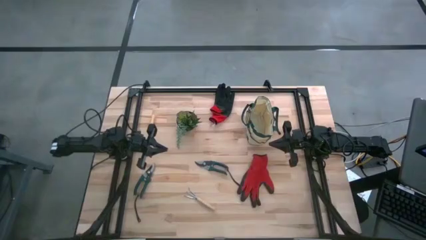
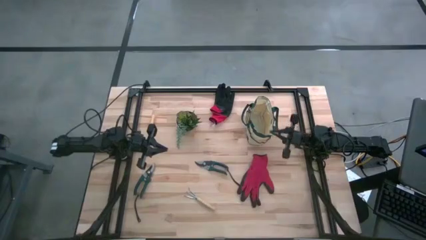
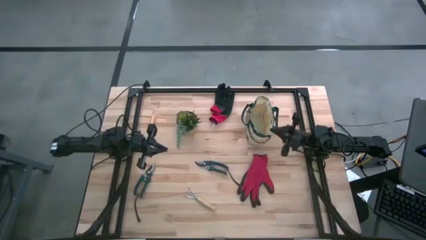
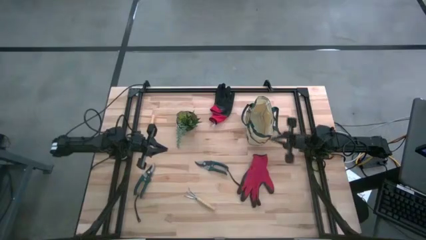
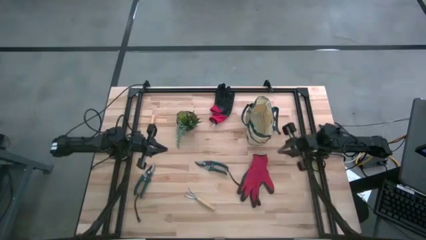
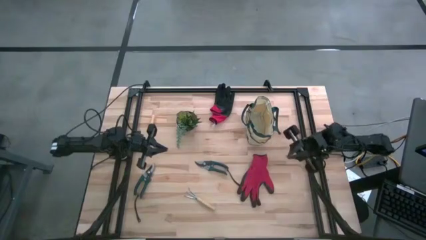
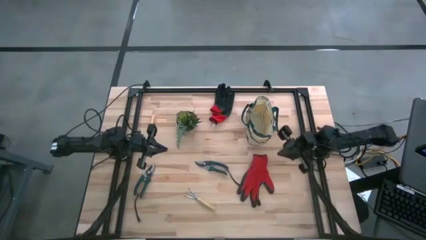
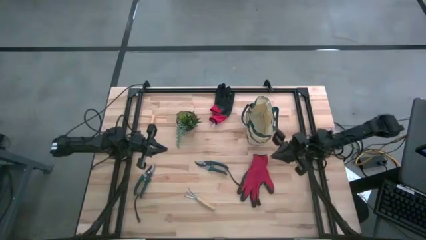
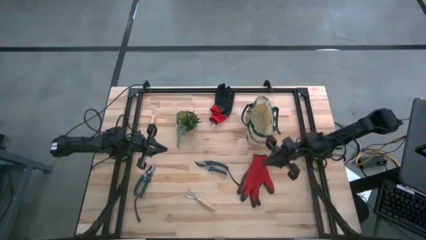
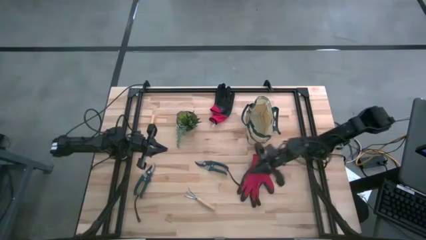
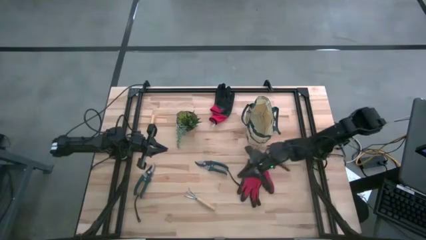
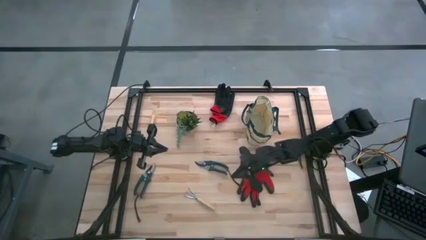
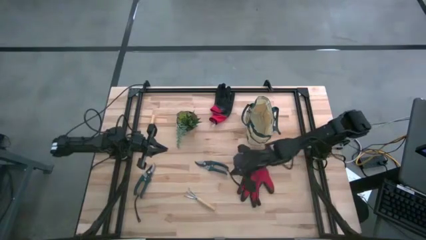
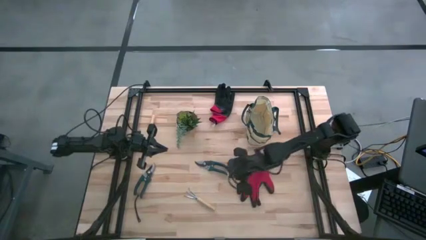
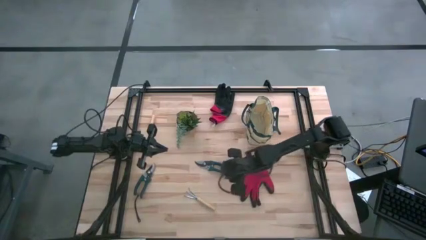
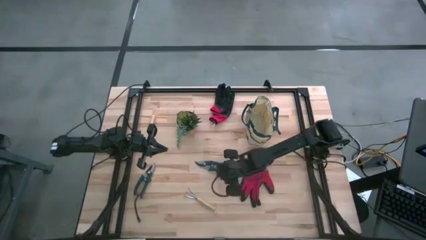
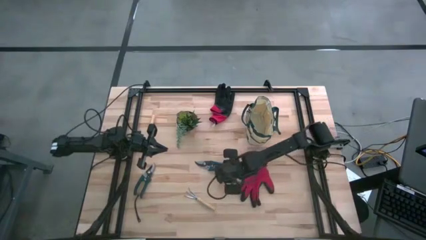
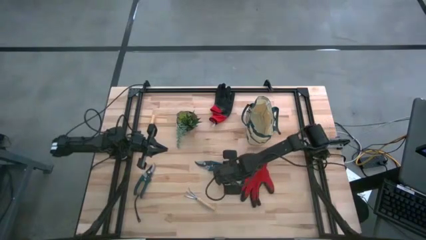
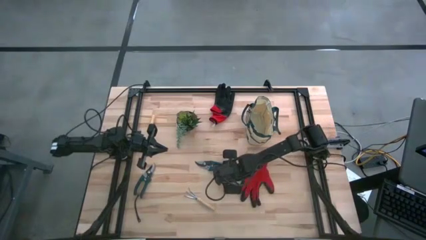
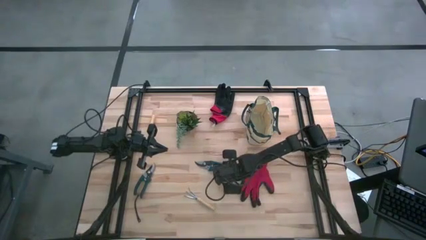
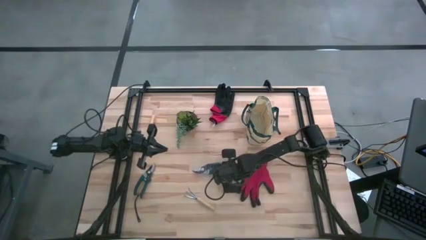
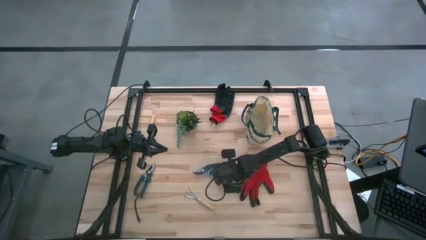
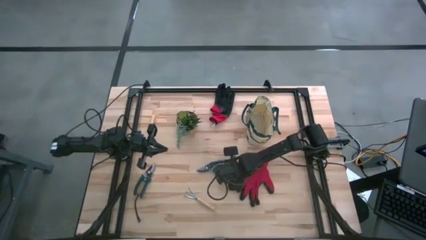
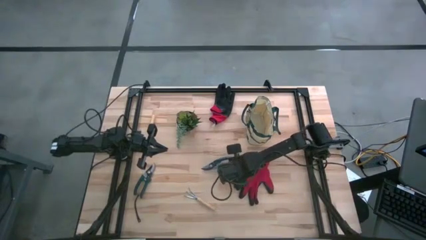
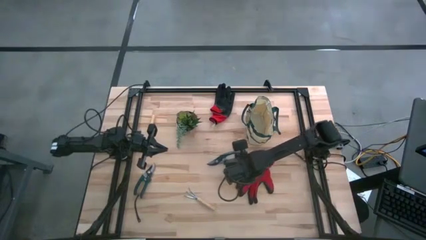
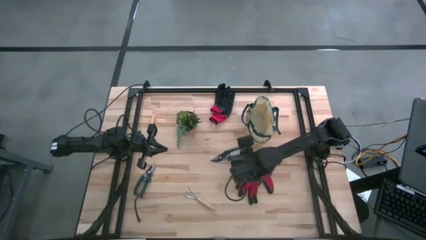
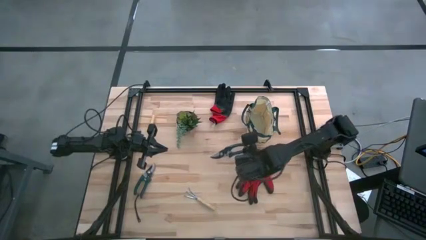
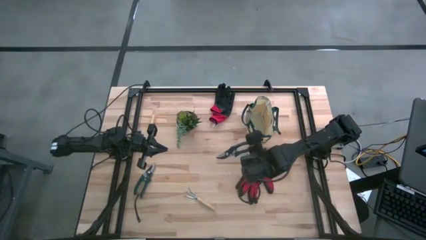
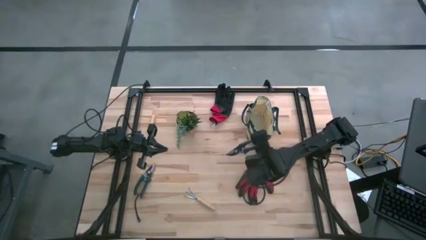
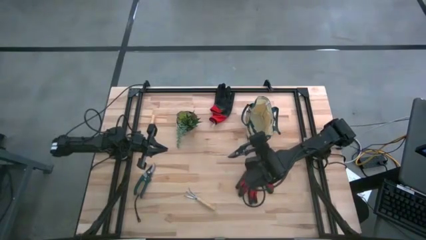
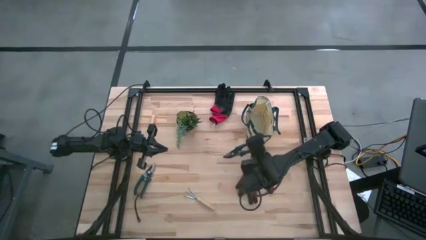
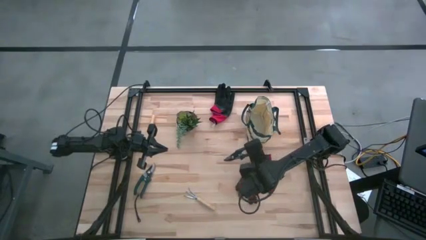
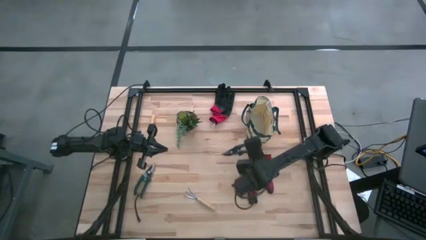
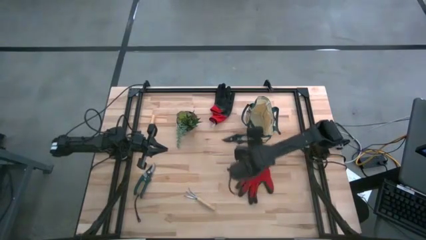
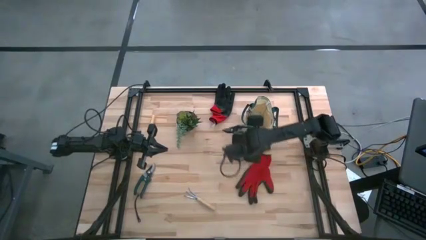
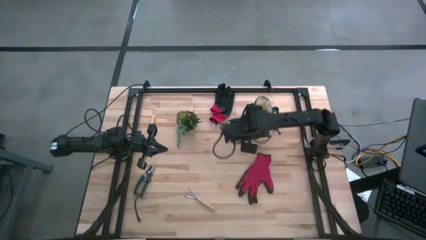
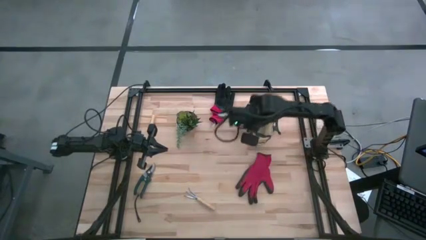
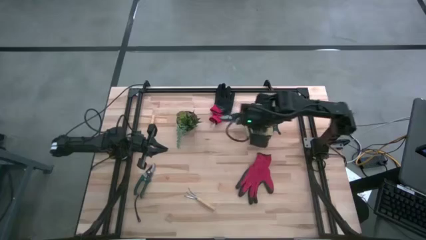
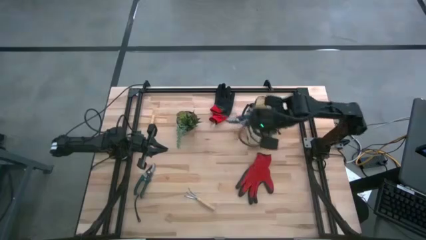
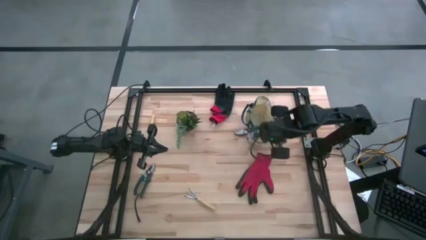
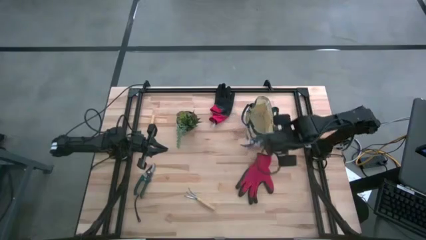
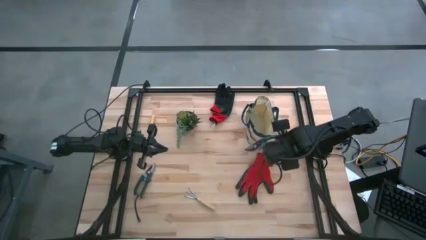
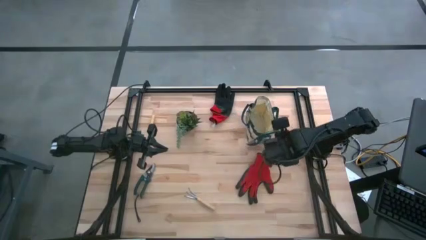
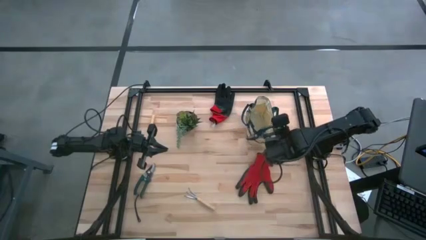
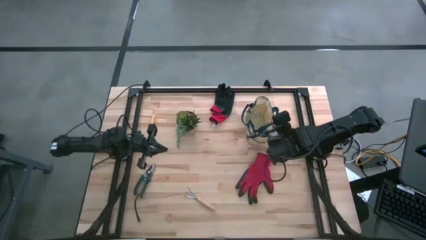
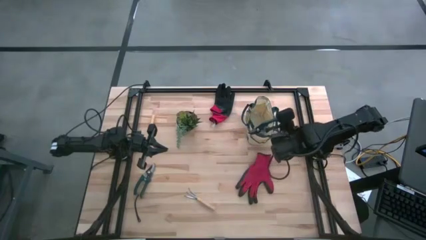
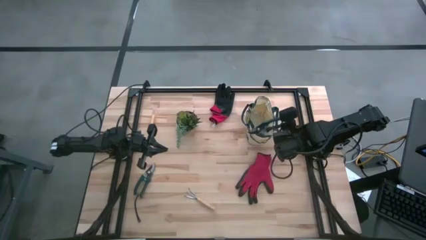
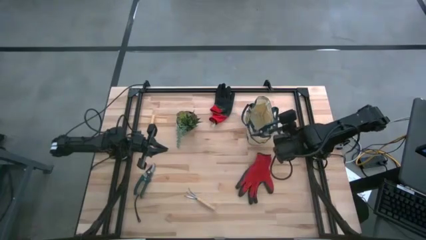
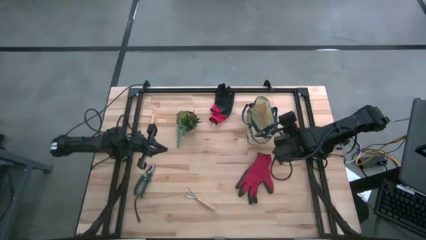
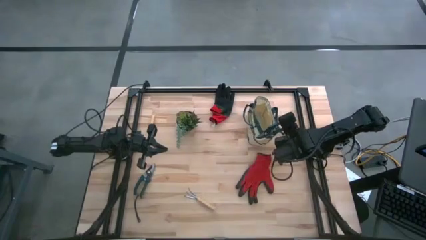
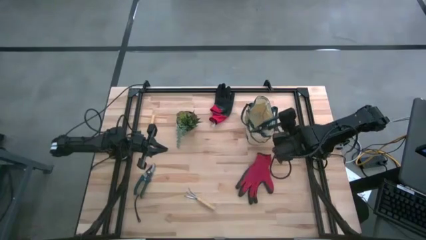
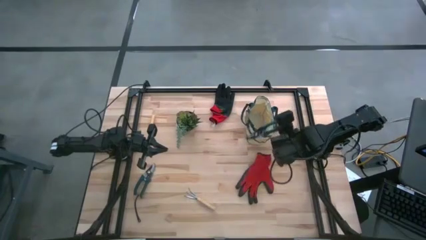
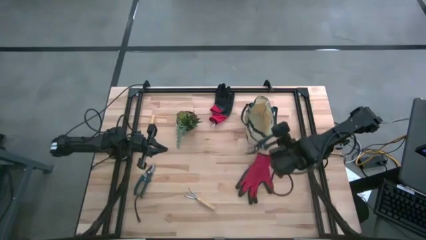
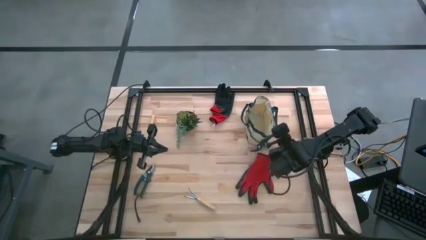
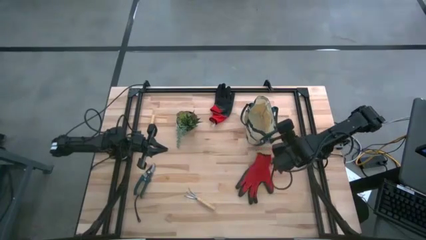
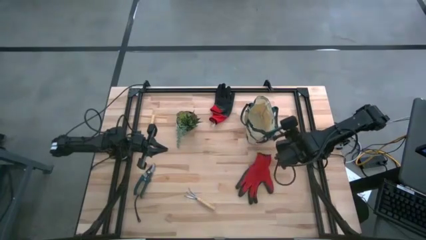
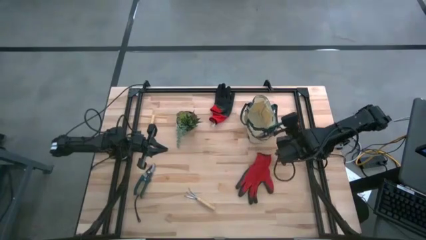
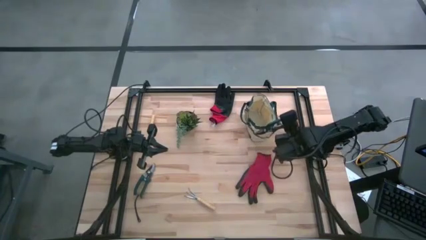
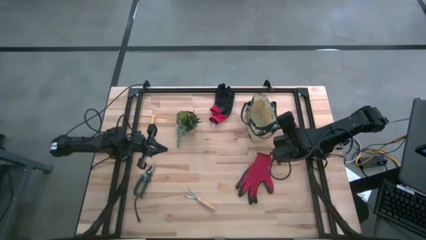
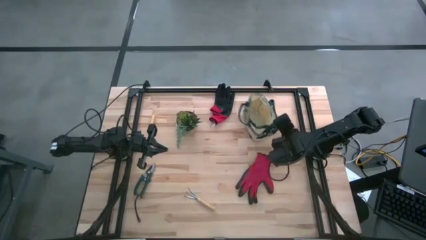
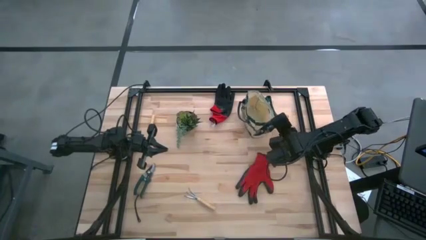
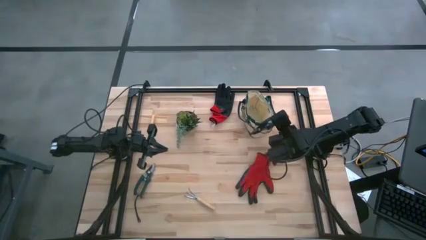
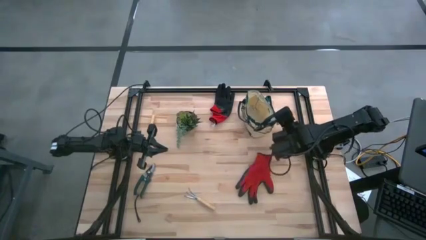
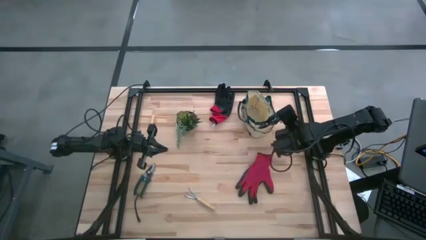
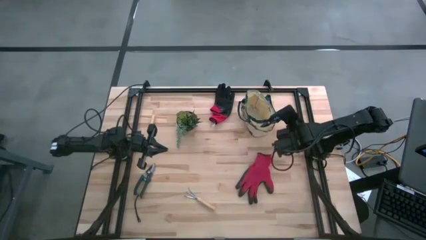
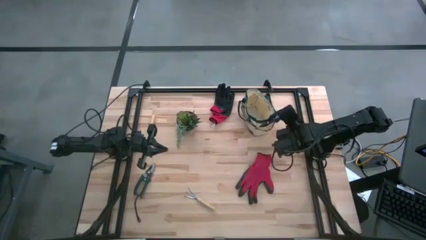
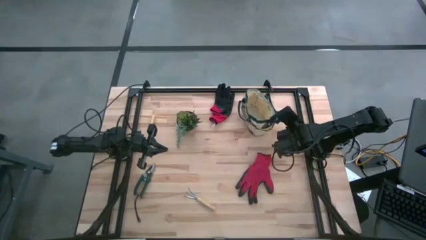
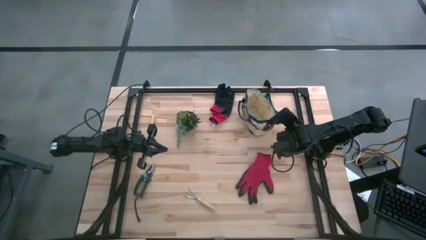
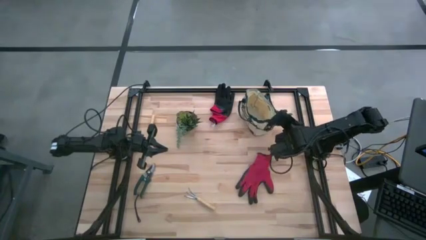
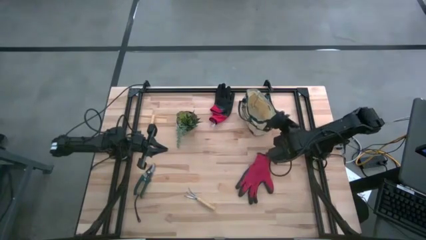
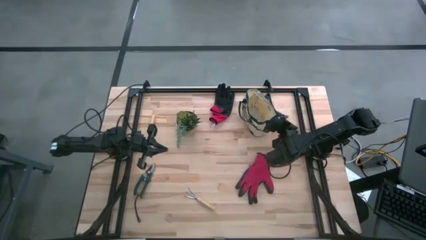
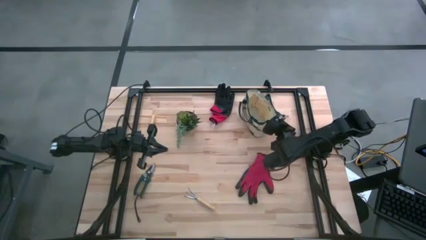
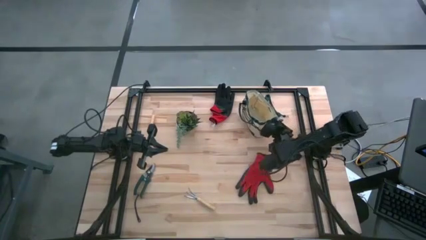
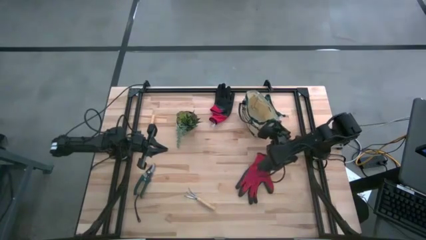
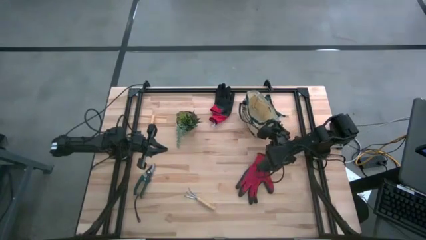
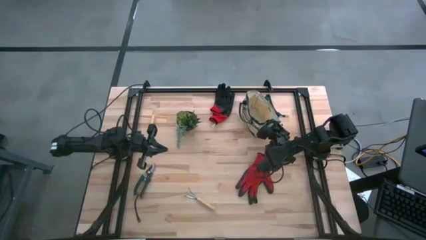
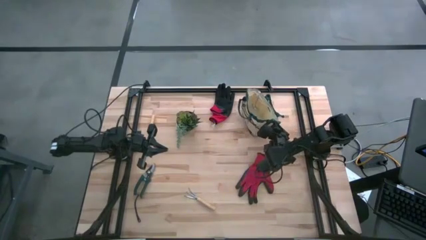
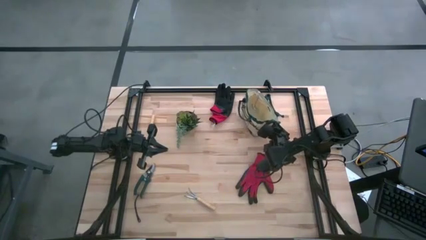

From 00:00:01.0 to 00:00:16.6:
Task: Pick & Place Garden tools in Gardening bag
Put the right green shear scissors into the gardening bag
